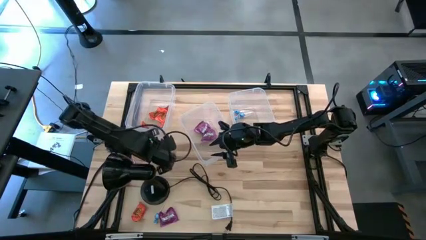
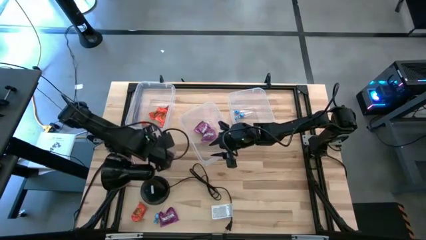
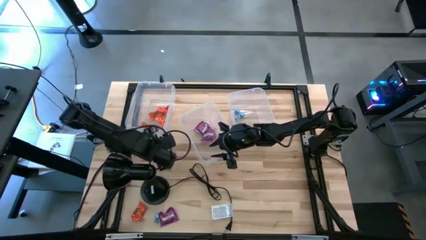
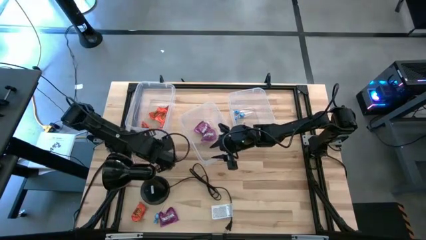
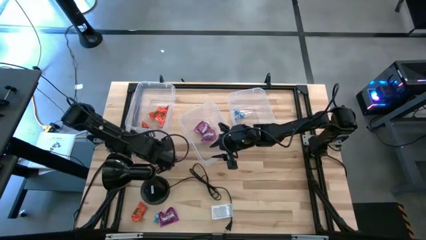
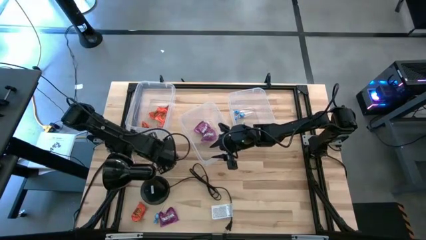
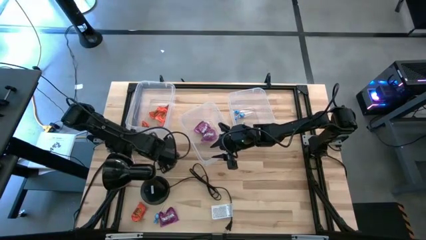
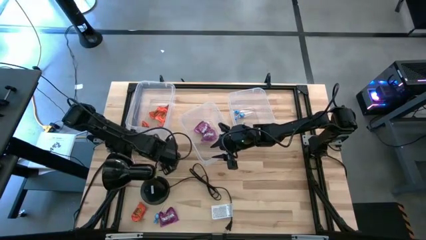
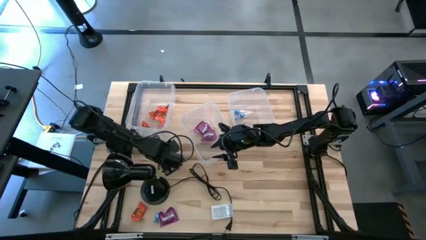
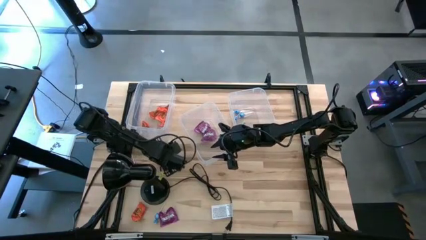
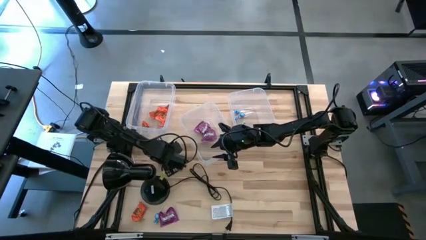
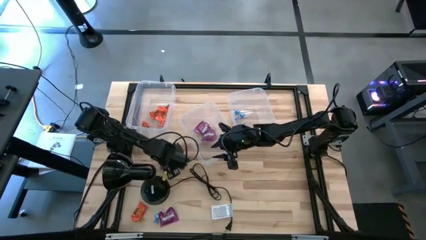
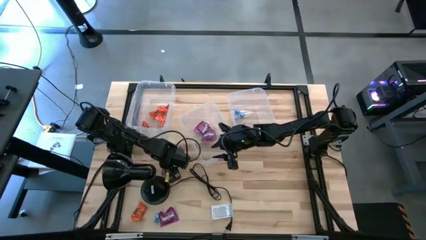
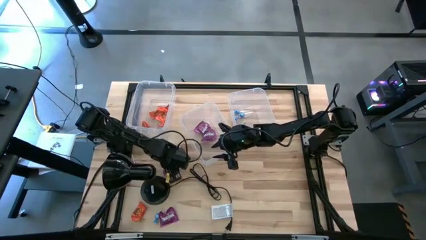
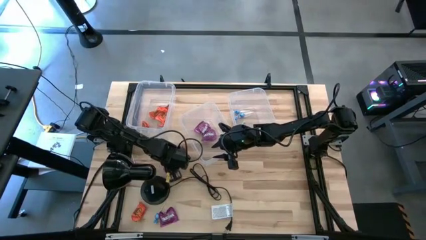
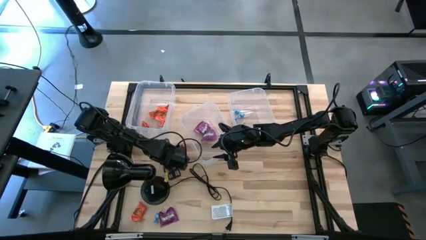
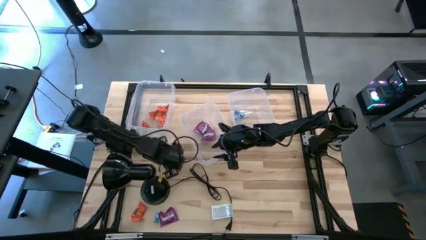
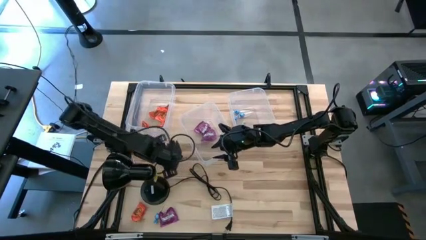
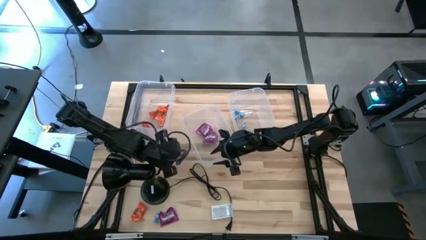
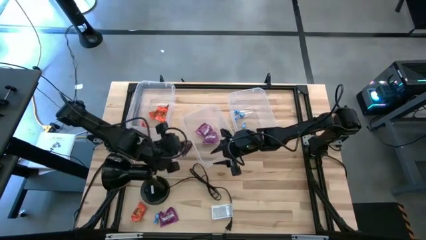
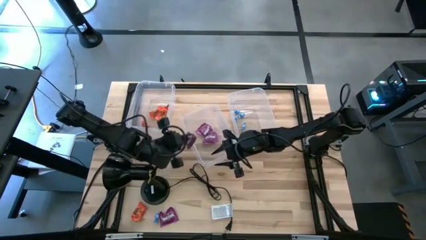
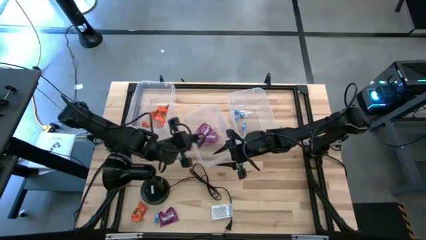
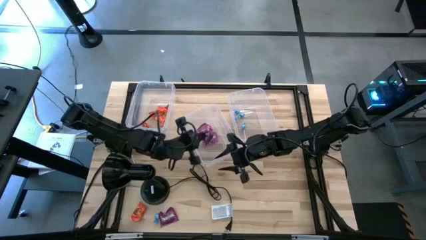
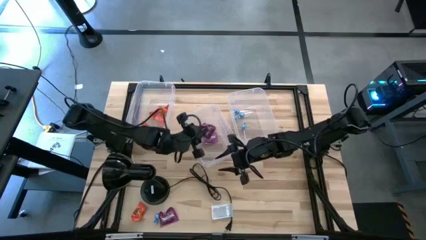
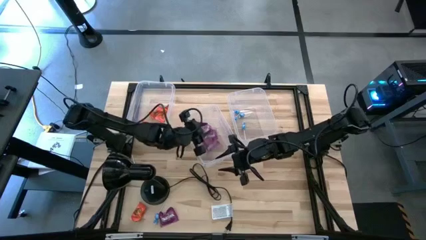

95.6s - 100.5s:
Task: Sort candy
Put the violet candy into the center transparent bin

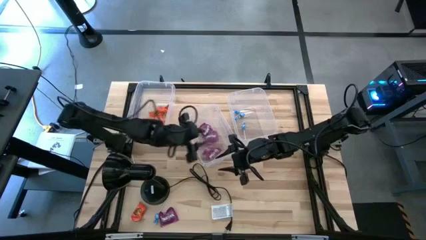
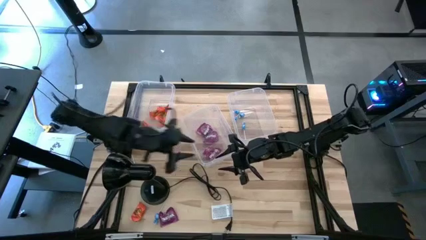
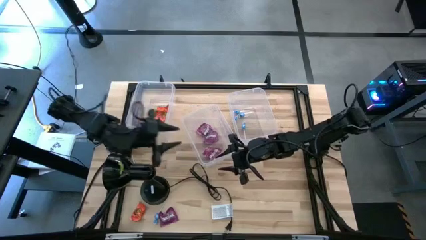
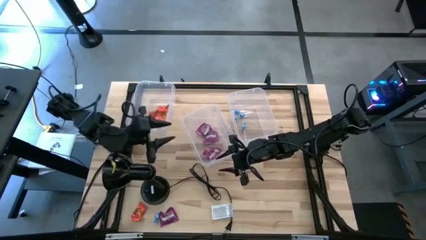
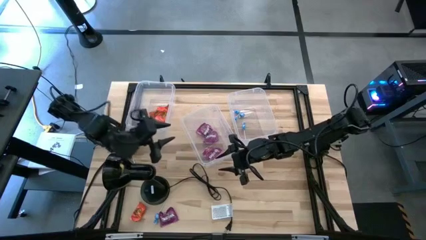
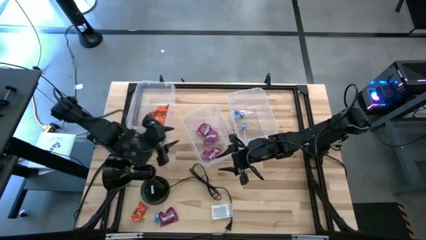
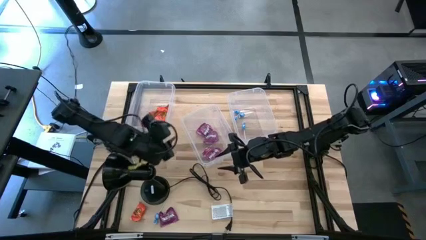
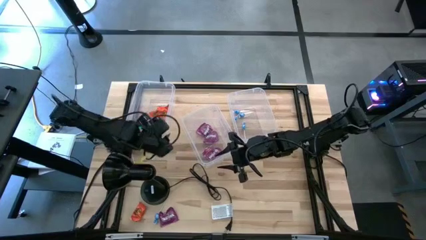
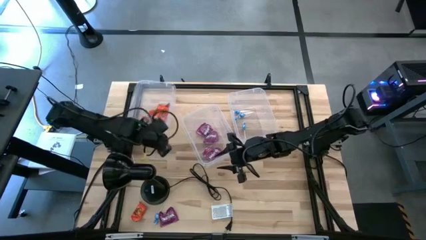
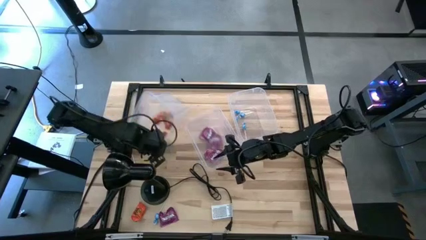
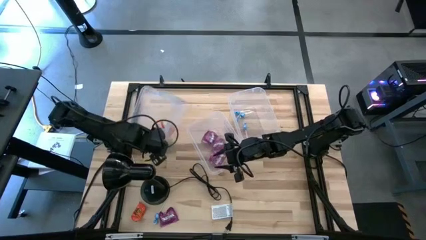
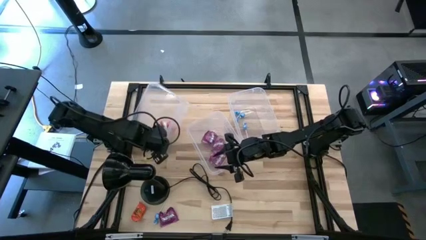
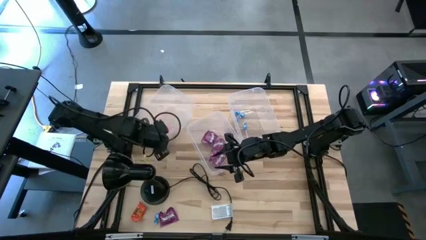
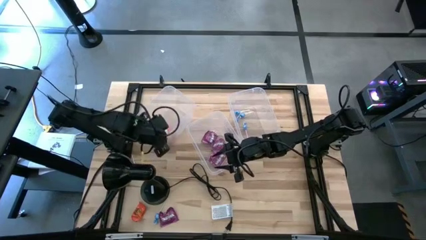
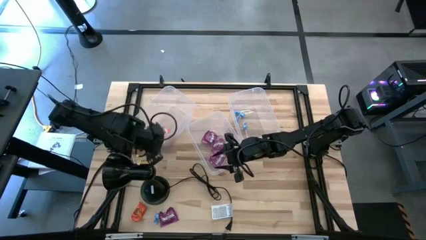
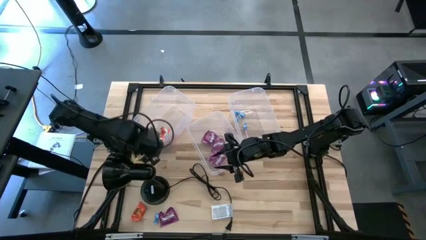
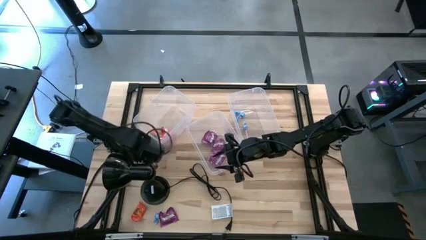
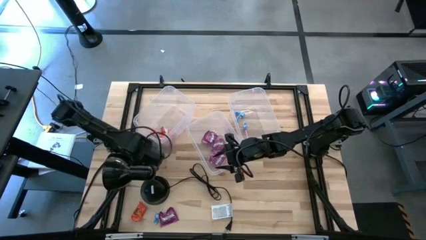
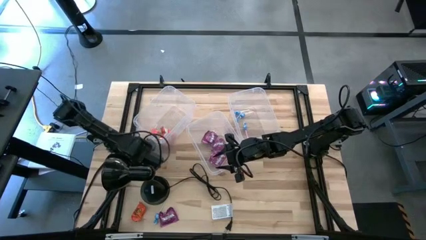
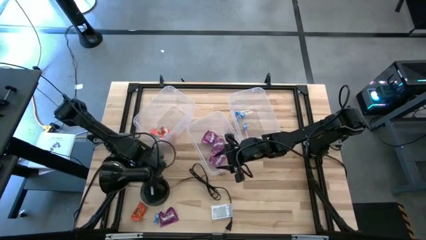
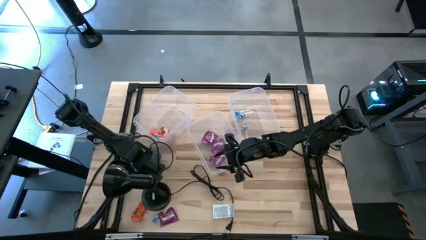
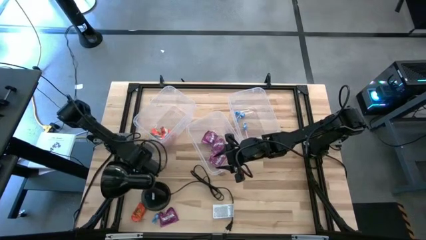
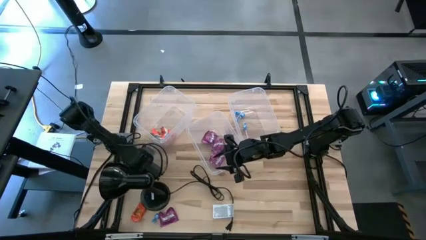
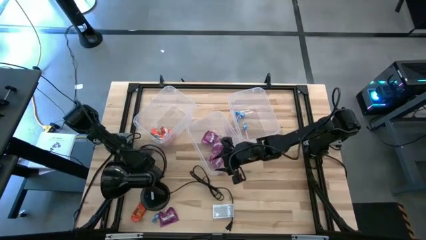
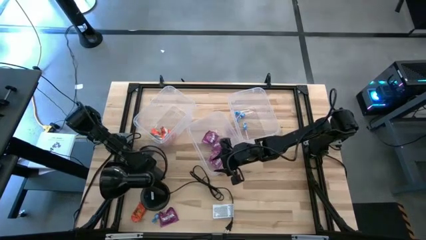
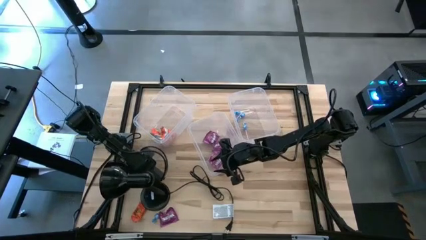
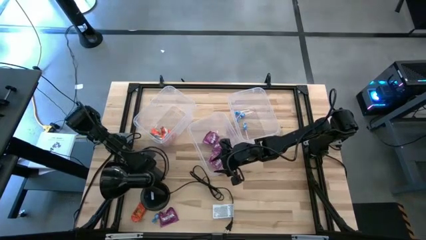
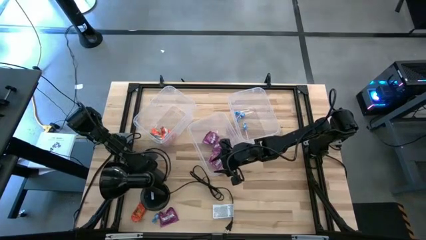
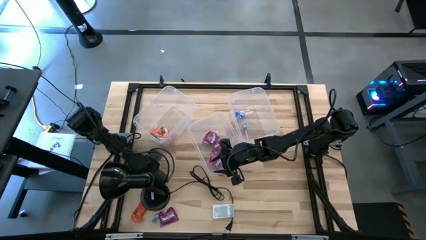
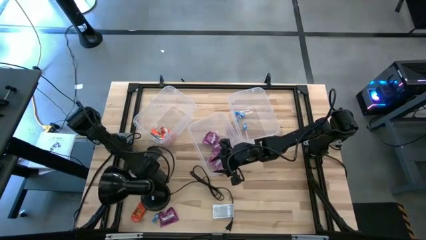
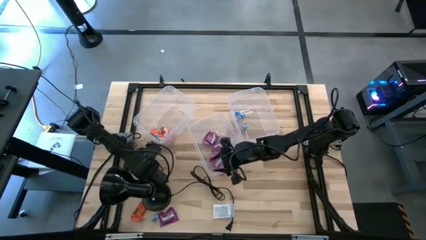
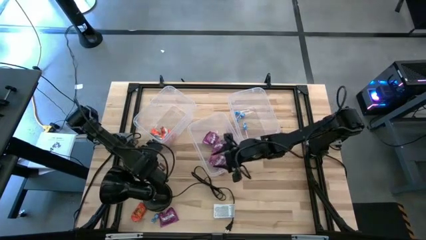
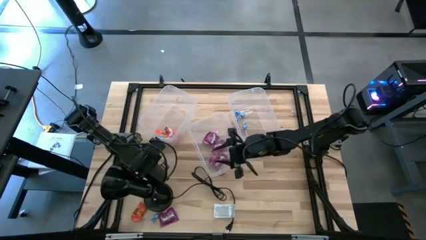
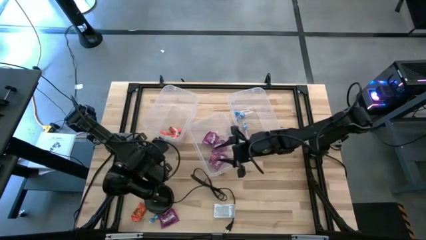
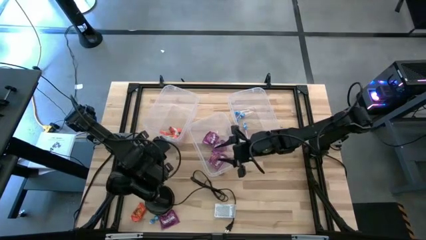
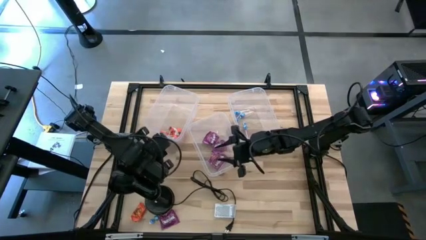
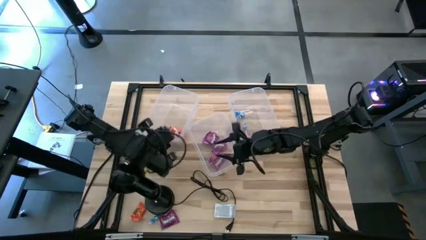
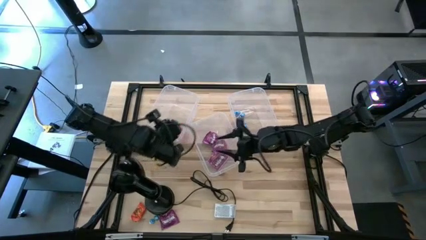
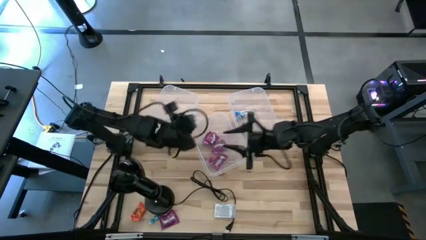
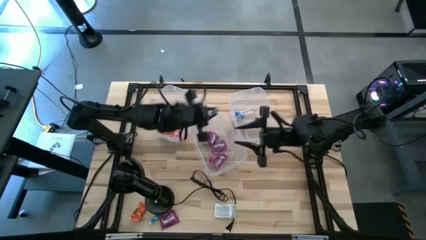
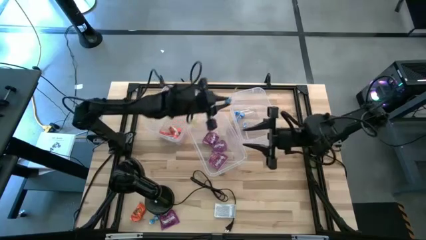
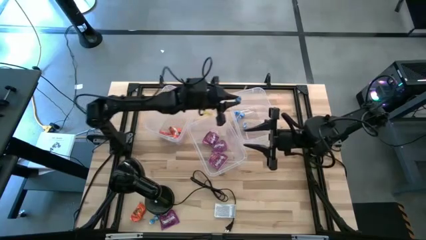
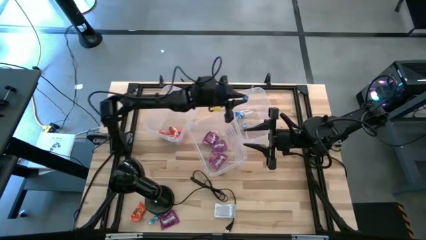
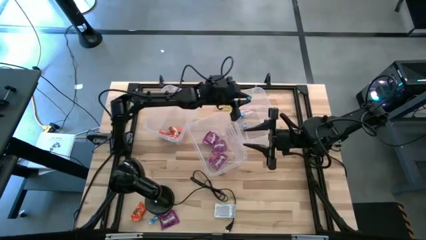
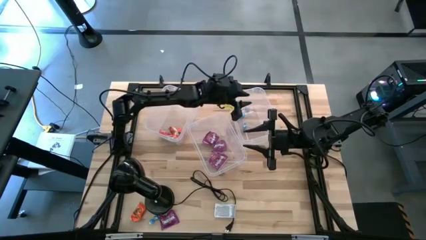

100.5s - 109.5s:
Put the blue candy into the right transparent bin

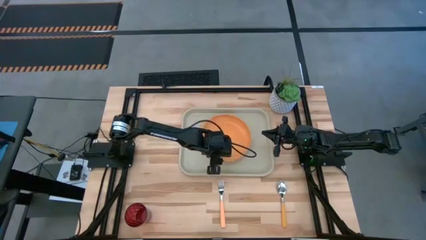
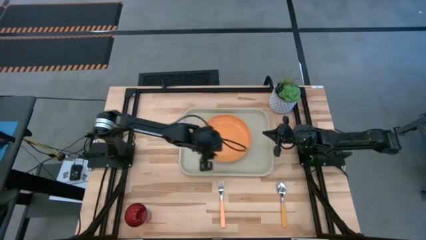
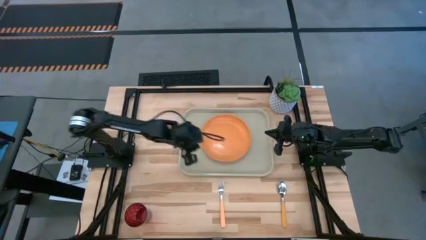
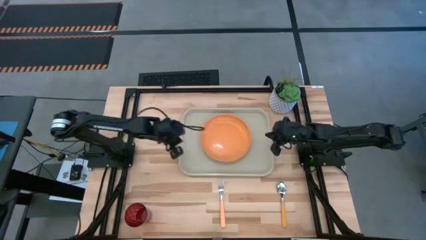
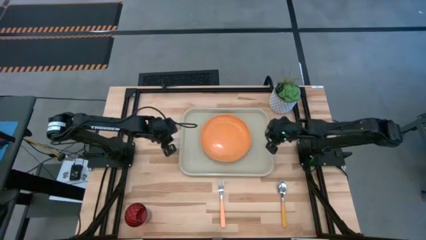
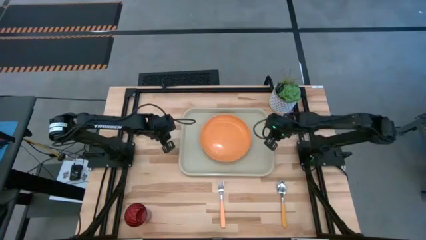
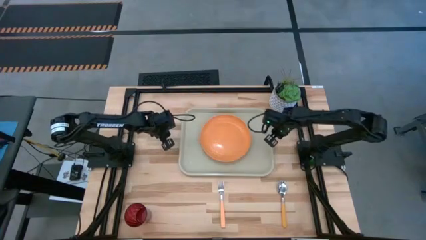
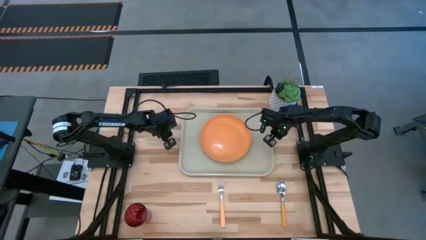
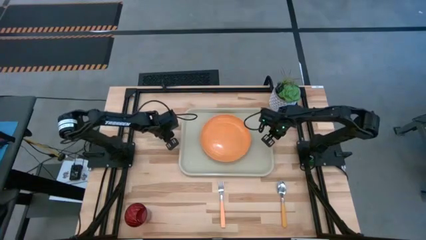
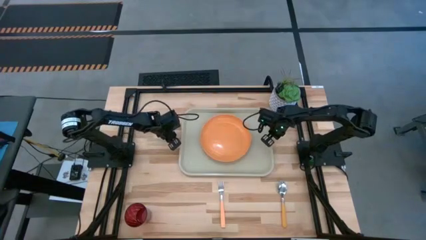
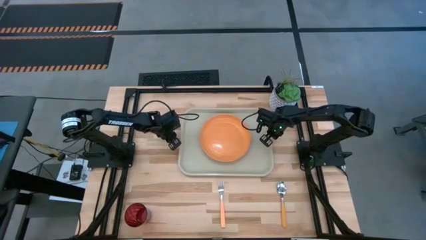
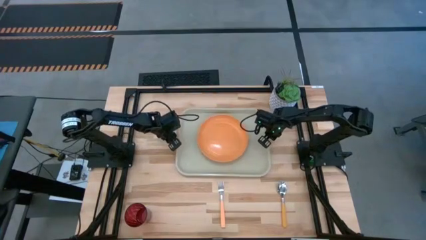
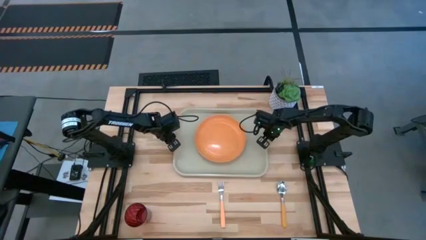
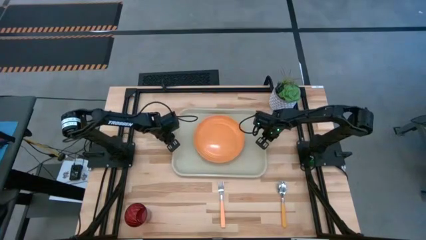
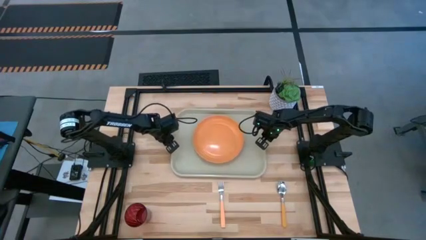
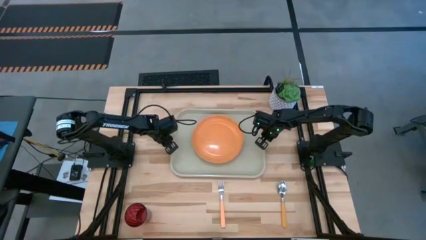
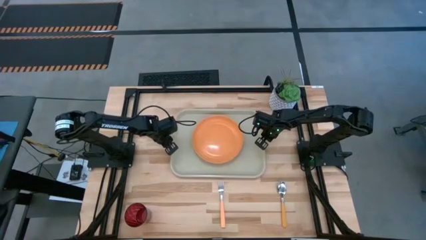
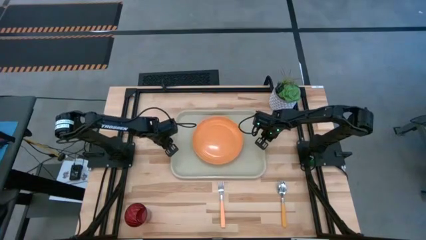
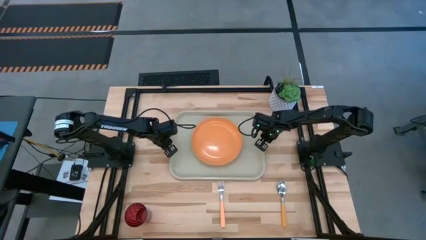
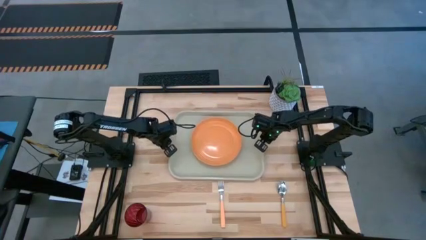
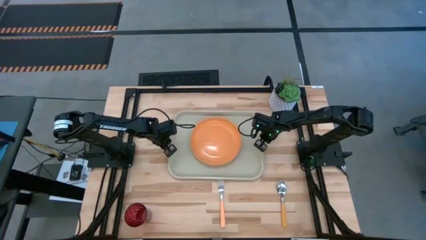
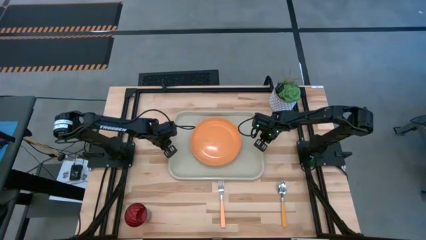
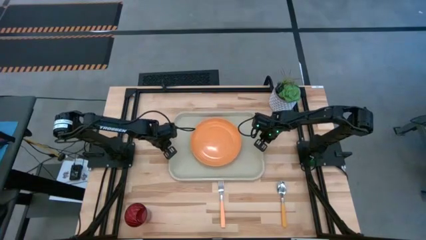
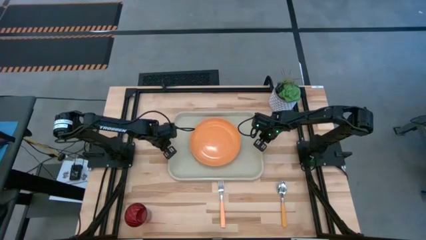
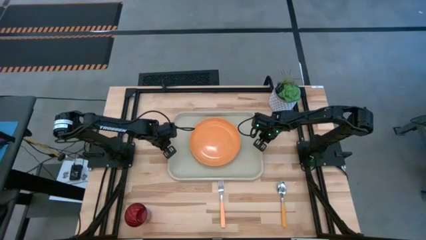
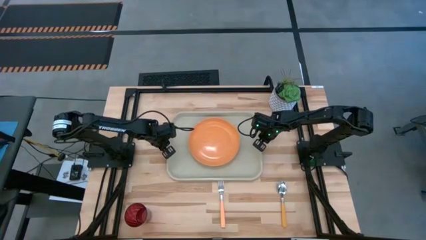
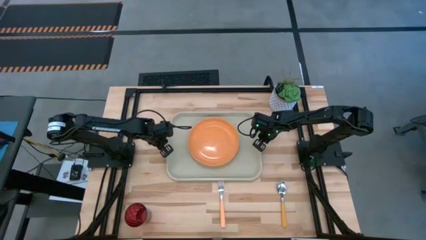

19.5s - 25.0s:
Task: Pick and place plate/cup/fork/spoon on tray
Adjust the gray serving tray
